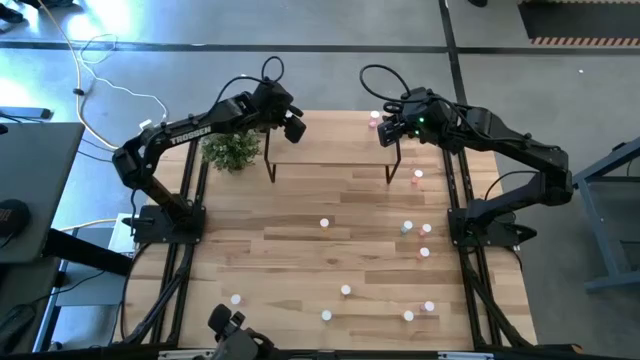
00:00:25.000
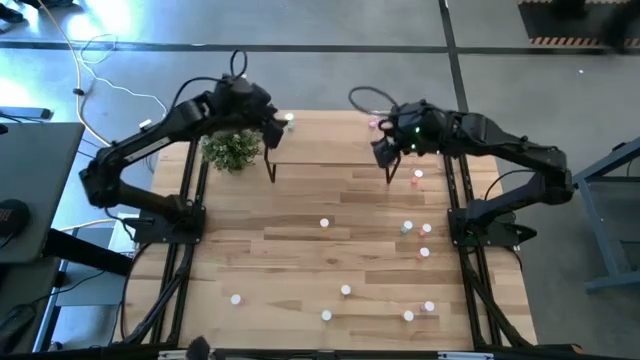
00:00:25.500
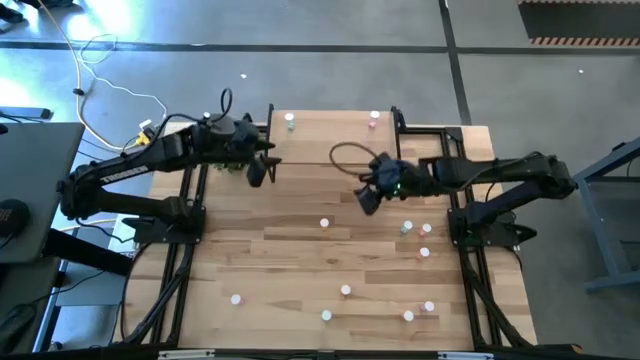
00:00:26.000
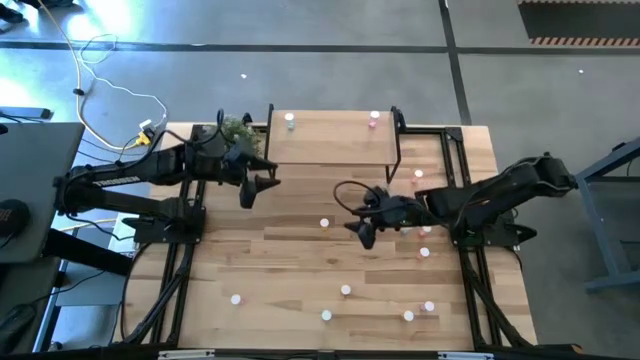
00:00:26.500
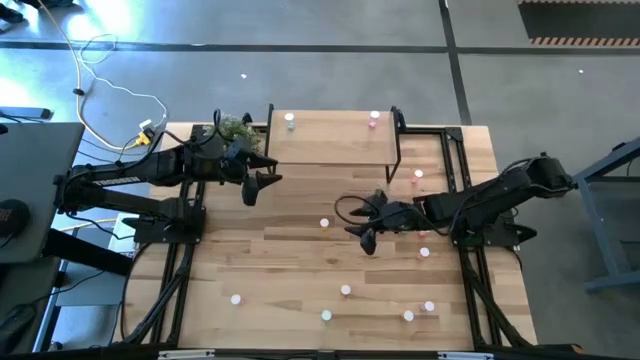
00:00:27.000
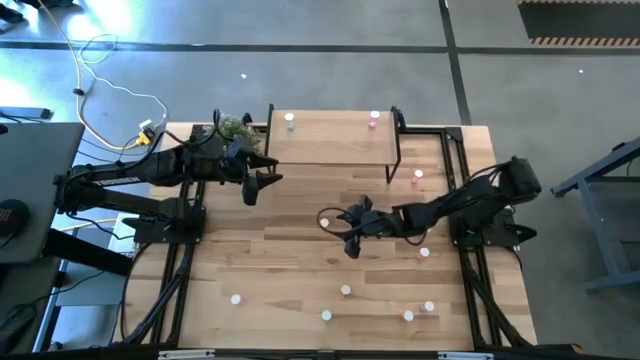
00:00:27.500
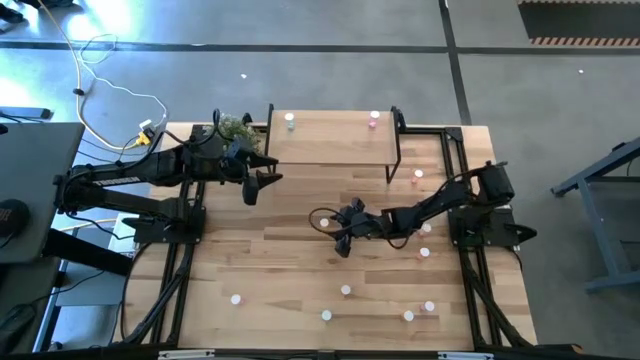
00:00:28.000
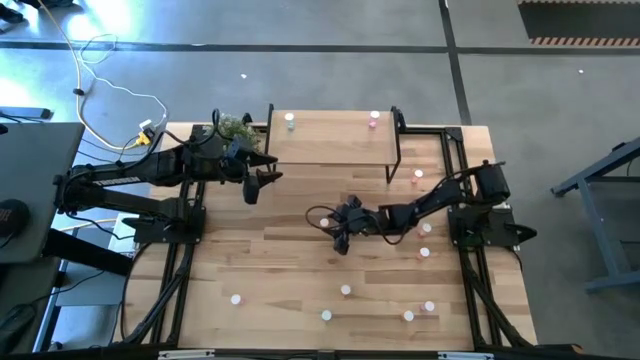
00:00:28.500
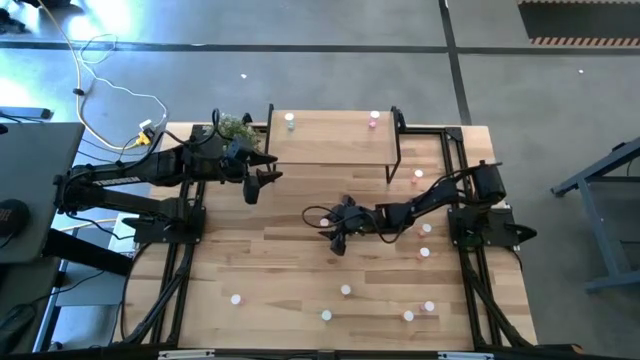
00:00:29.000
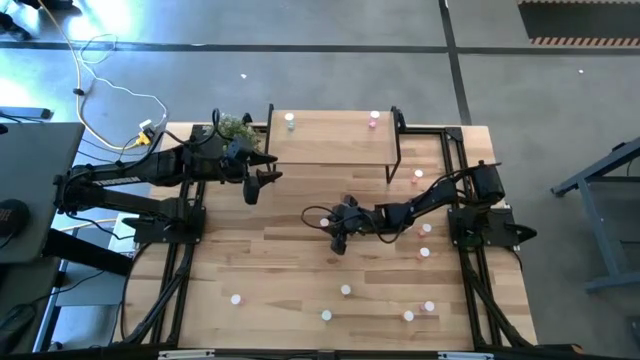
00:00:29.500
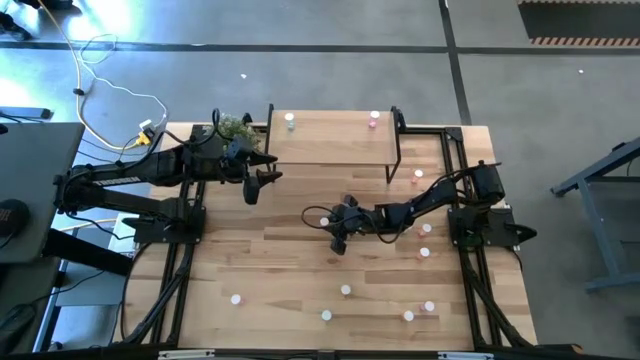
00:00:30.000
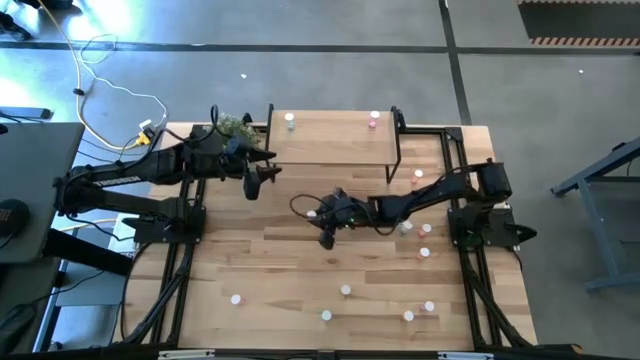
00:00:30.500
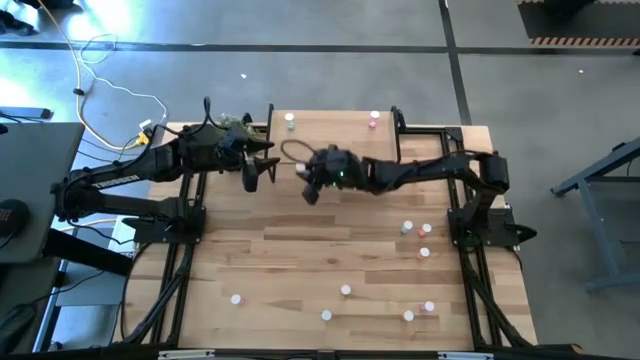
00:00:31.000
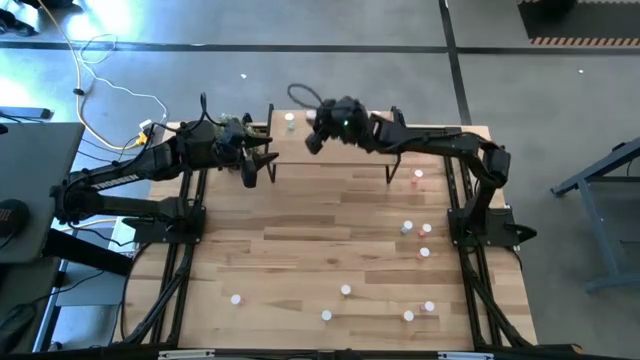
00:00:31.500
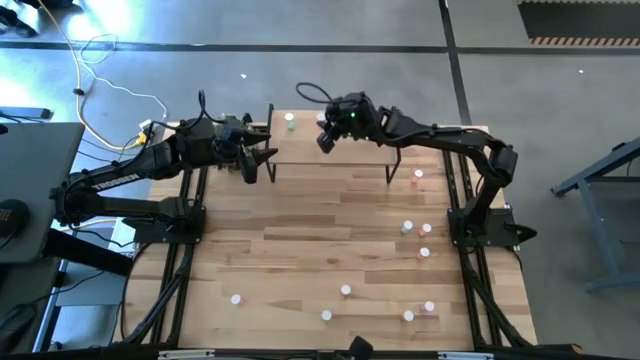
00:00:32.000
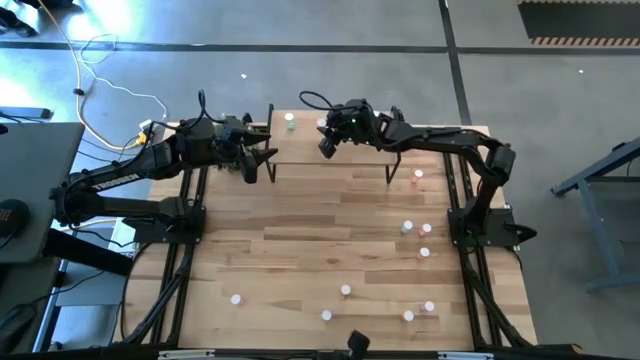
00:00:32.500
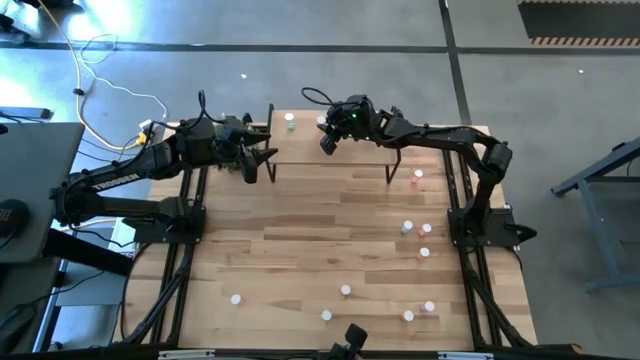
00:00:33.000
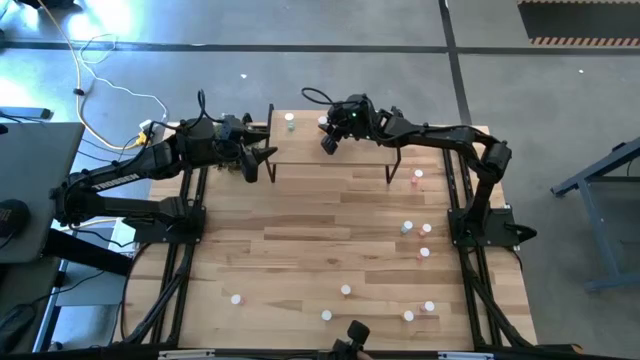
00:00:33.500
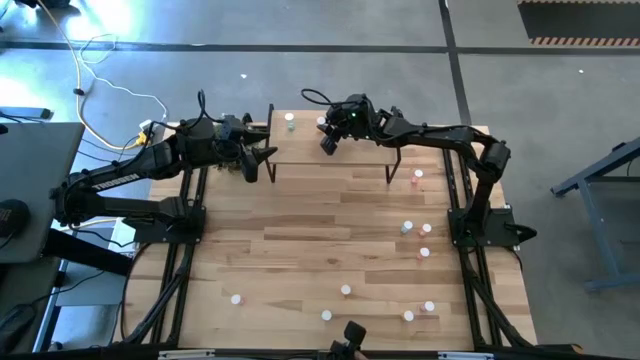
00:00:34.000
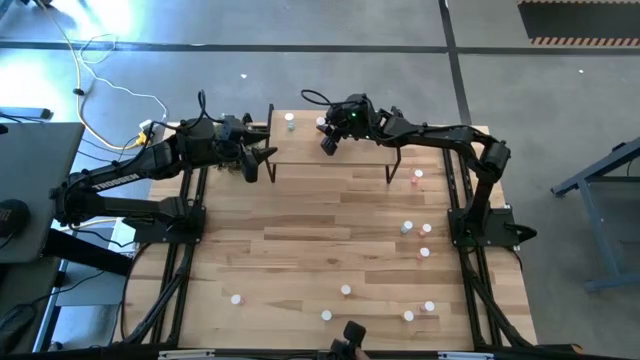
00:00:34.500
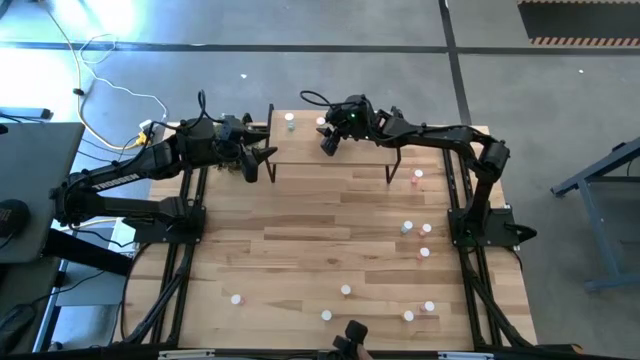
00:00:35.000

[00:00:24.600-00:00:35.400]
Task: Pick and place medicine bottles onto shelf by color
Put the top left yellow pill bottle on the shelf

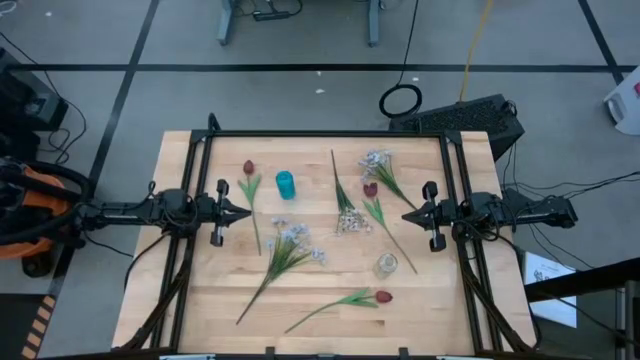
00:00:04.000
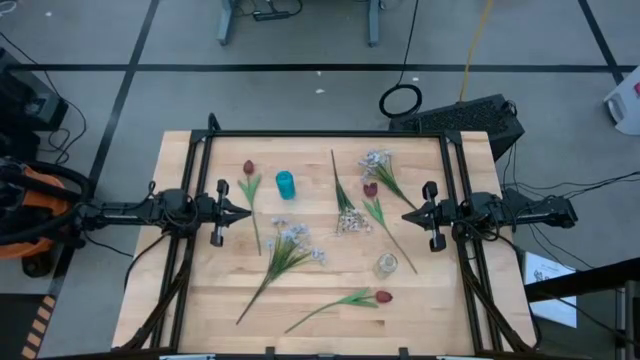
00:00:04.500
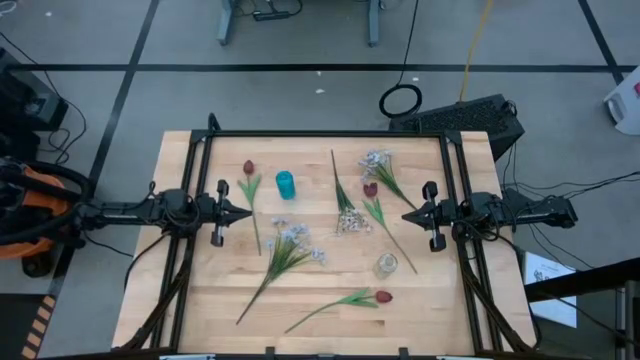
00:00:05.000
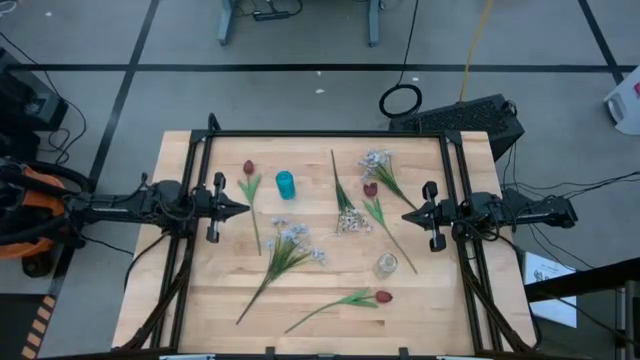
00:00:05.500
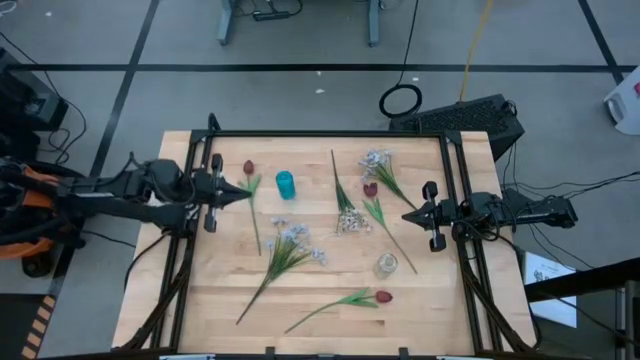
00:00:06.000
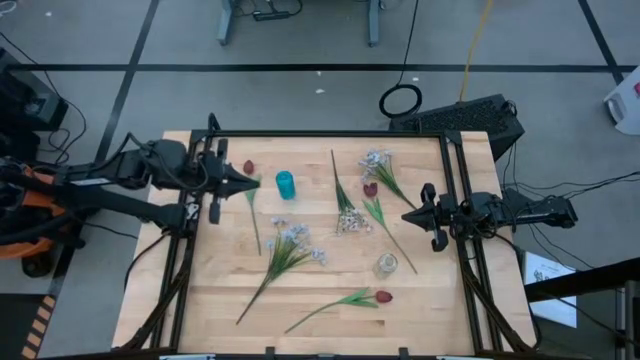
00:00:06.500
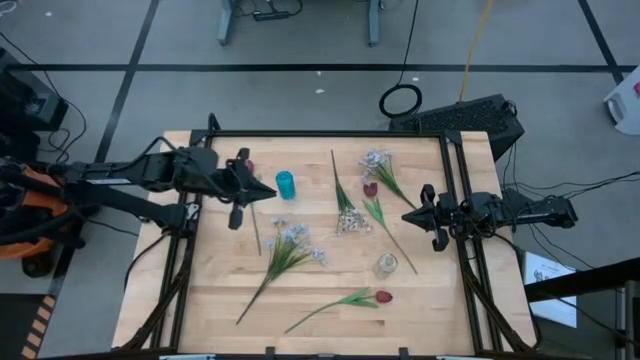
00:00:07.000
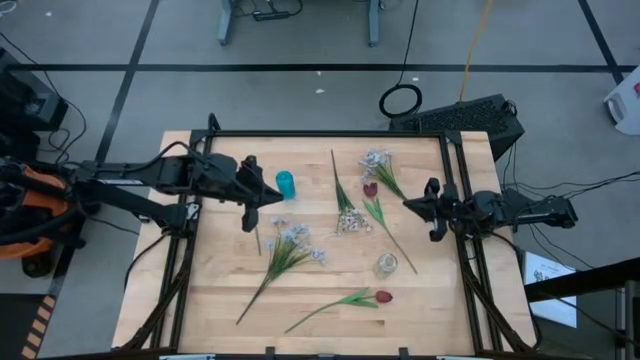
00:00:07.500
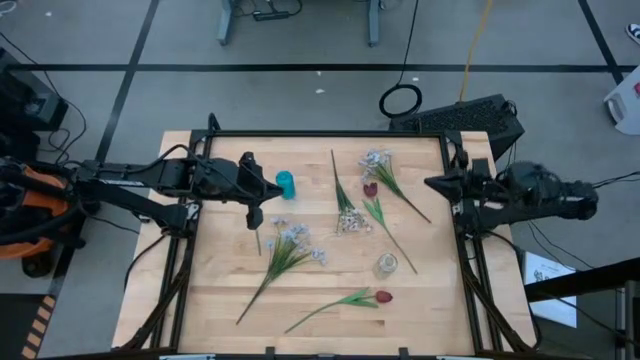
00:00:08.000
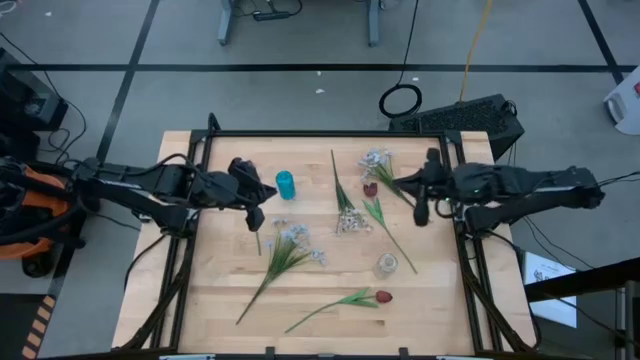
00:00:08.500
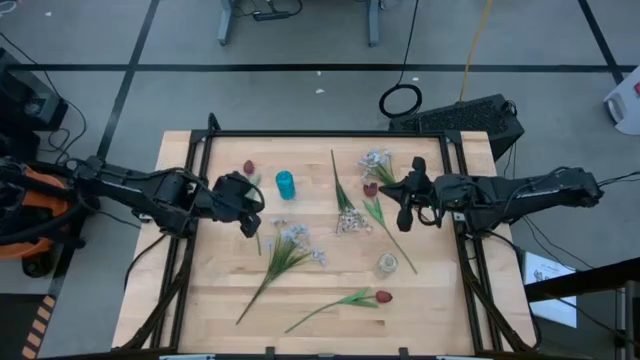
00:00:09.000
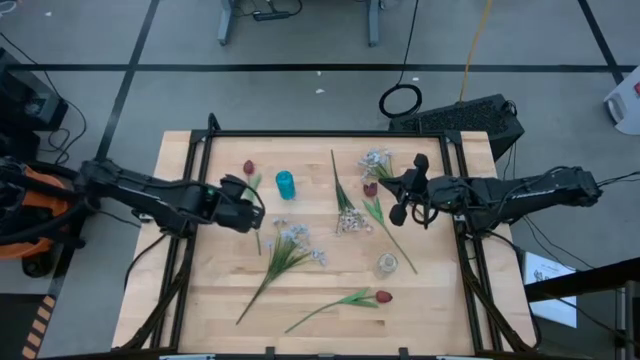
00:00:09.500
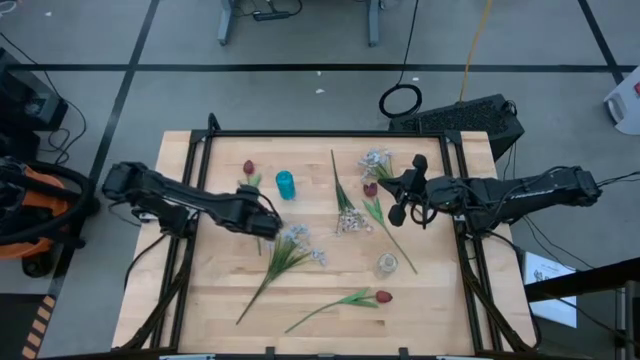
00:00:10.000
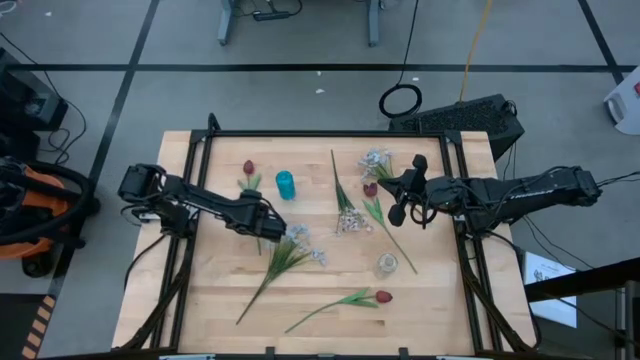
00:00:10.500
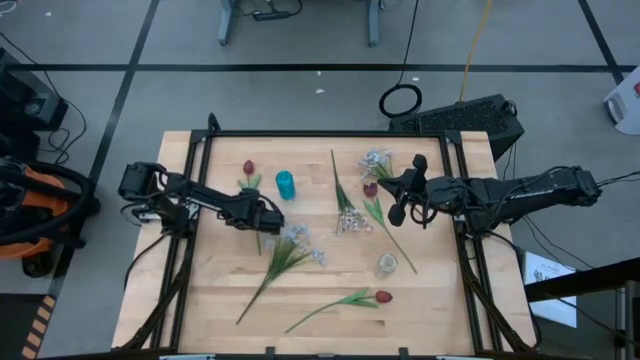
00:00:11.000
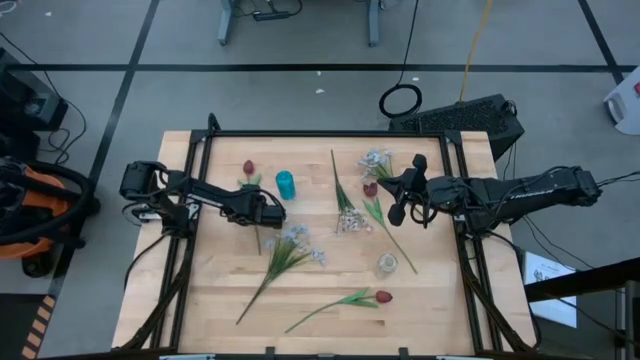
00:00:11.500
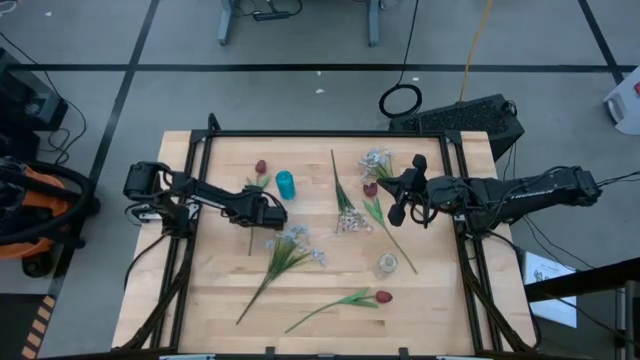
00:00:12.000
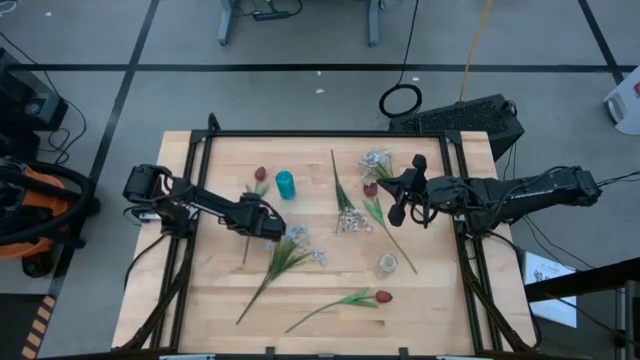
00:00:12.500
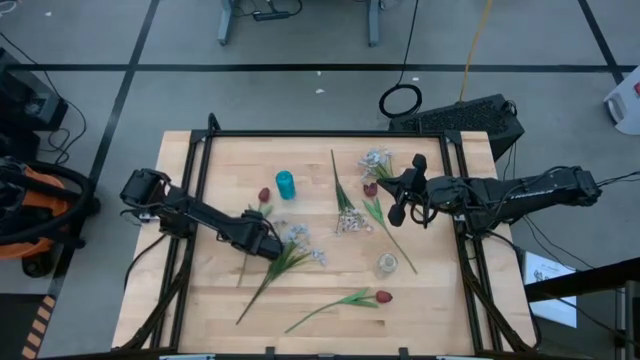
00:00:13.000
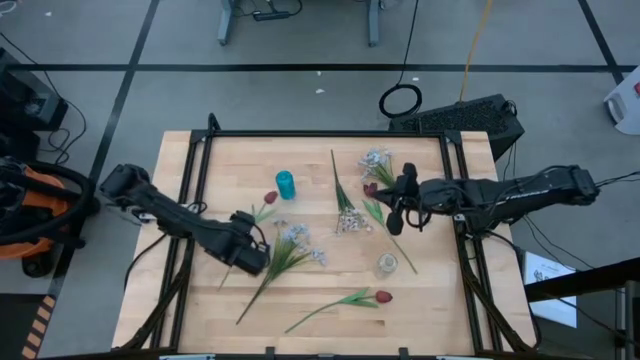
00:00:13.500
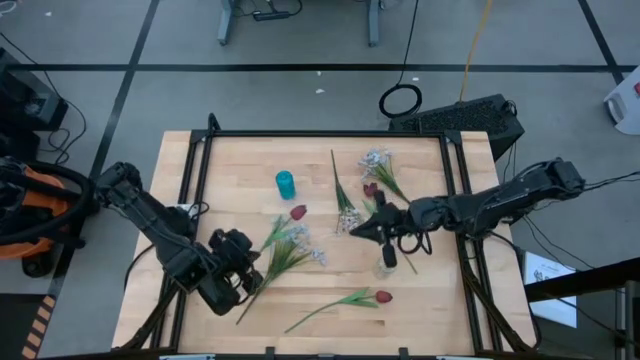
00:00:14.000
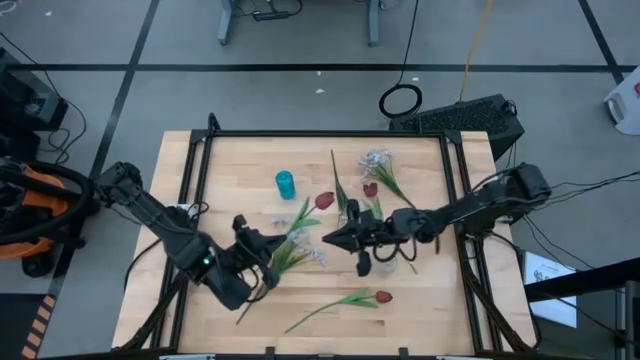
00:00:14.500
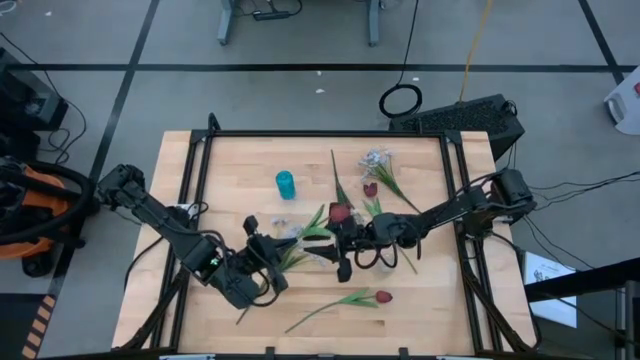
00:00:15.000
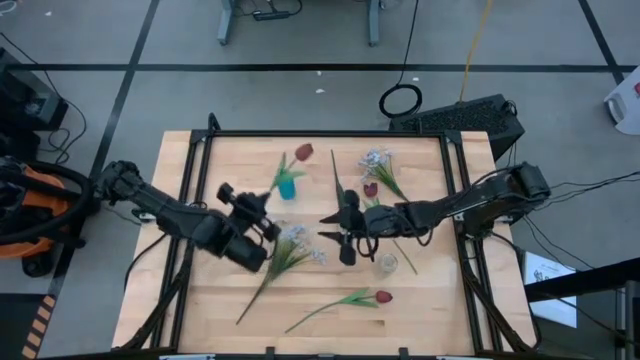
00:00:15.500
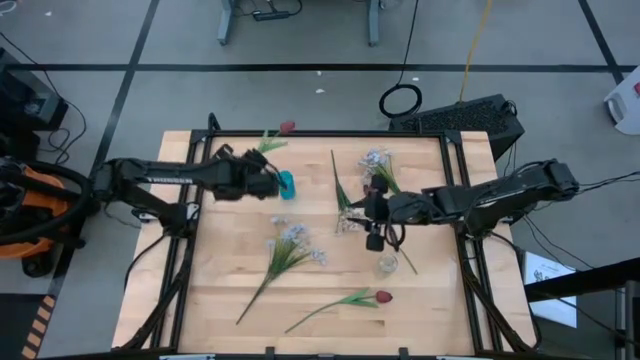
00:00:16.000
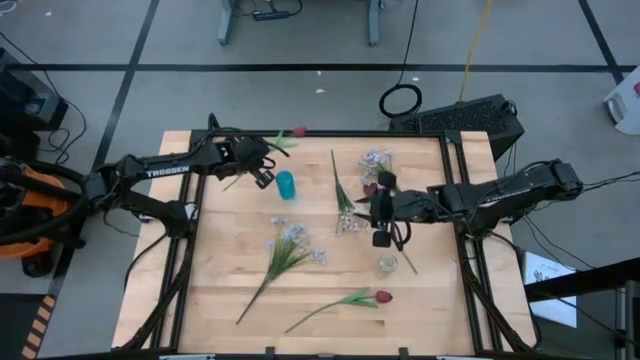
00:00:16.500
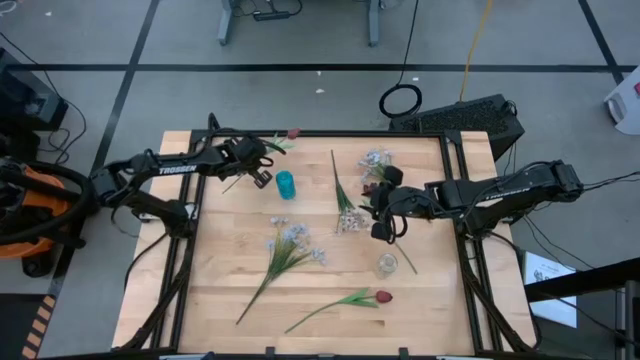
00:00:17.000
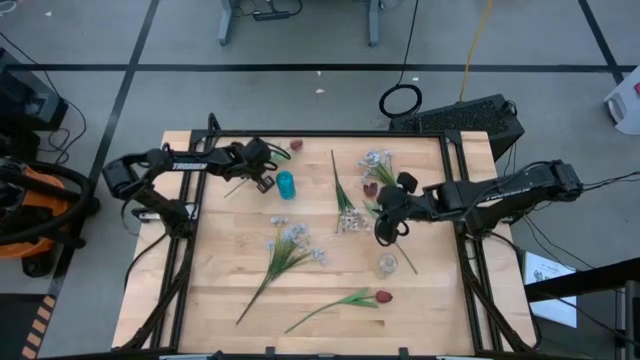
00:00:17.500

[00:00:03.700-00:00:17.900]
Task: Sort flowers into vase by color
Move the top left red tulip to the top left of the table
